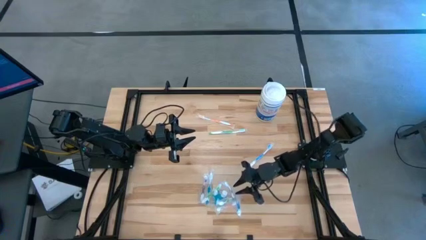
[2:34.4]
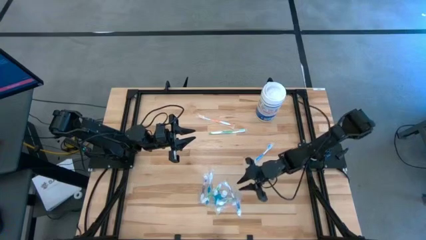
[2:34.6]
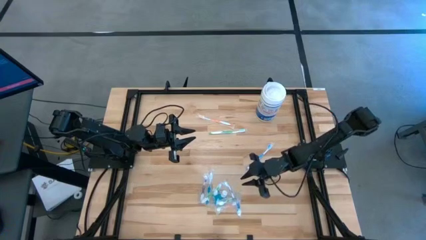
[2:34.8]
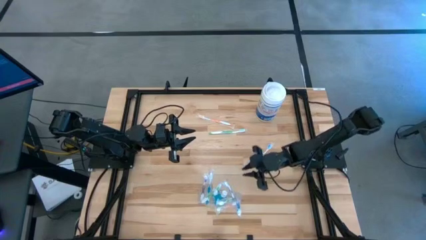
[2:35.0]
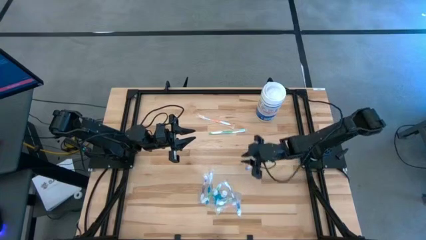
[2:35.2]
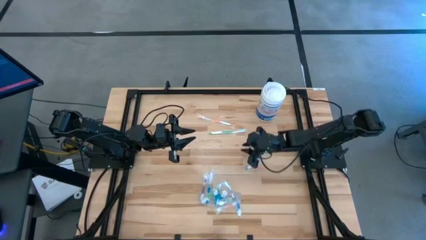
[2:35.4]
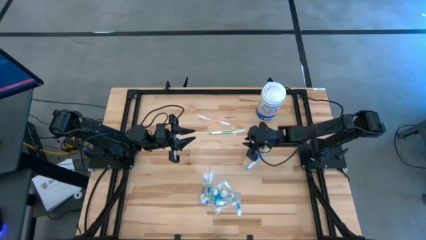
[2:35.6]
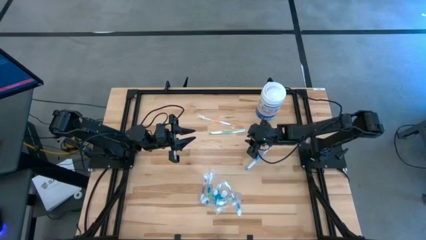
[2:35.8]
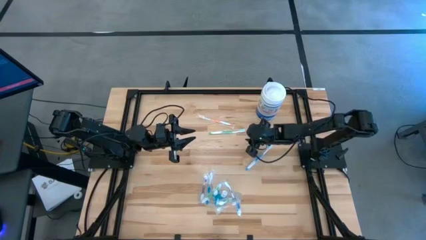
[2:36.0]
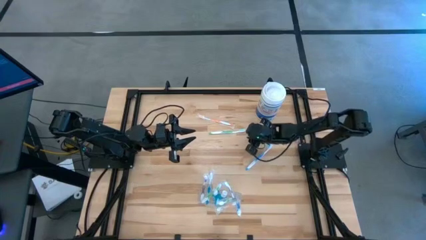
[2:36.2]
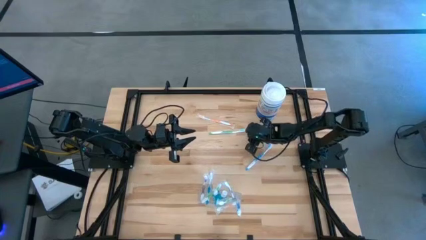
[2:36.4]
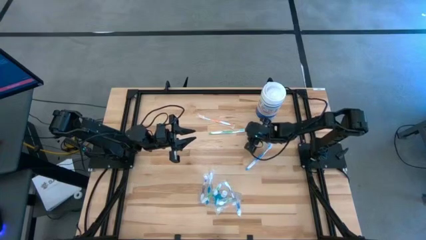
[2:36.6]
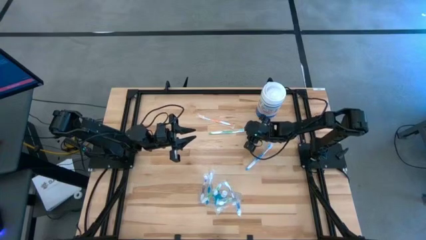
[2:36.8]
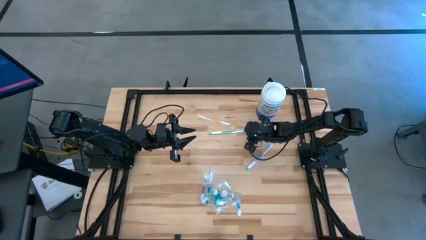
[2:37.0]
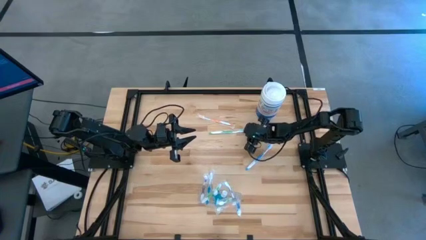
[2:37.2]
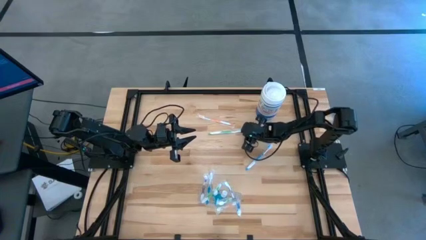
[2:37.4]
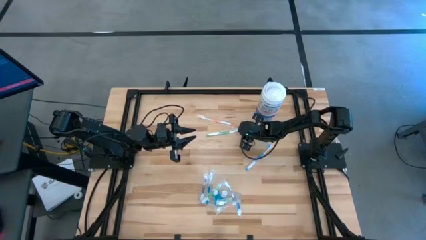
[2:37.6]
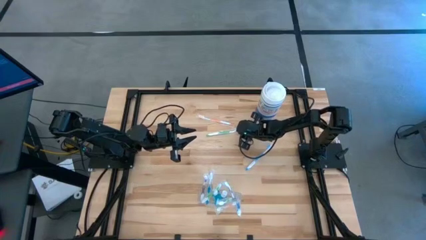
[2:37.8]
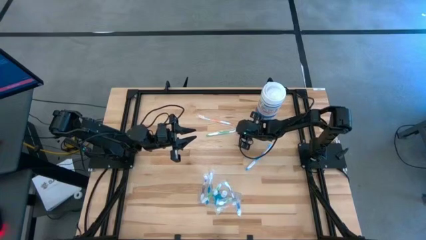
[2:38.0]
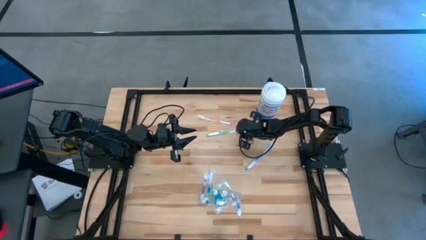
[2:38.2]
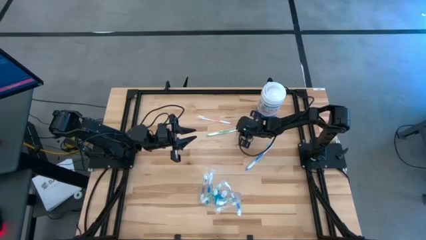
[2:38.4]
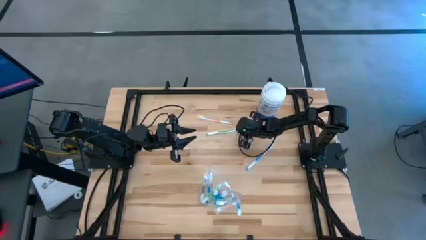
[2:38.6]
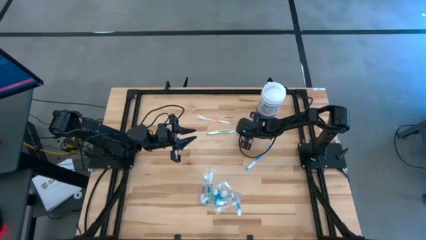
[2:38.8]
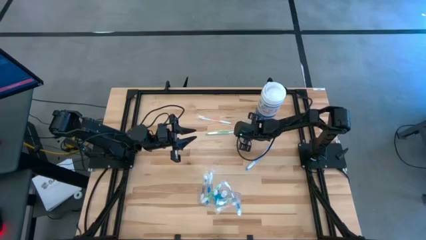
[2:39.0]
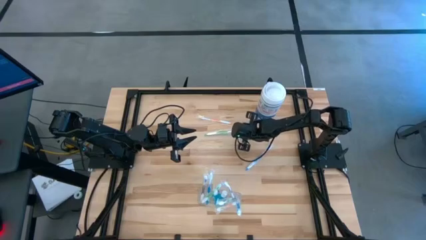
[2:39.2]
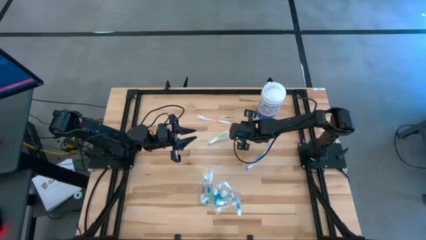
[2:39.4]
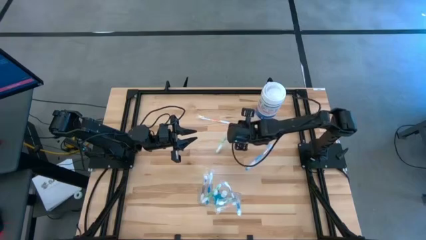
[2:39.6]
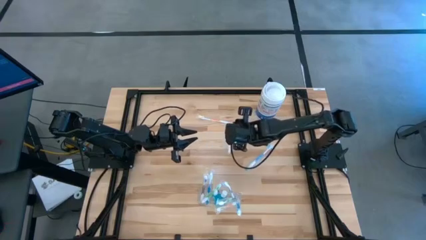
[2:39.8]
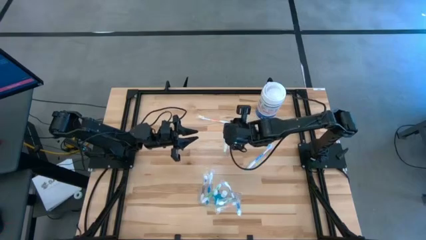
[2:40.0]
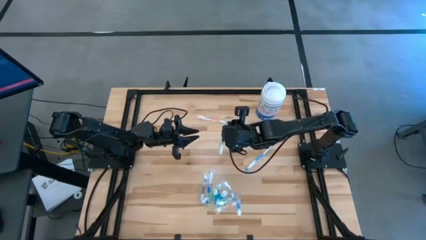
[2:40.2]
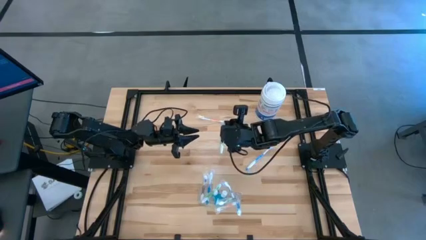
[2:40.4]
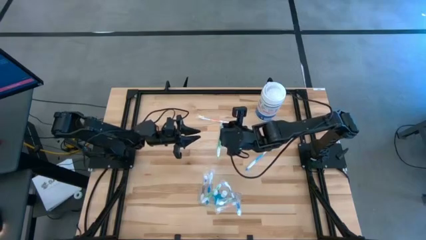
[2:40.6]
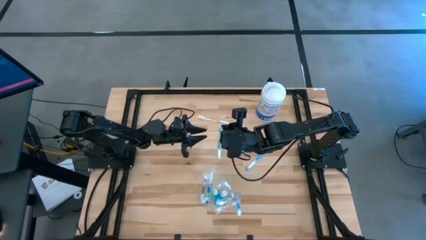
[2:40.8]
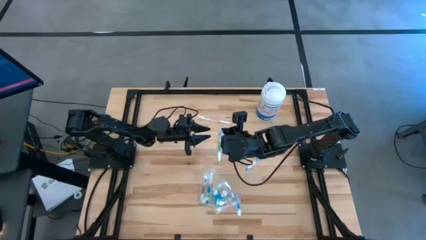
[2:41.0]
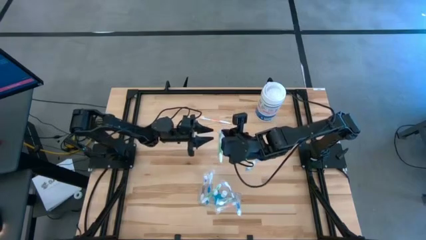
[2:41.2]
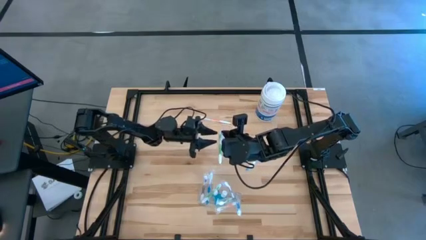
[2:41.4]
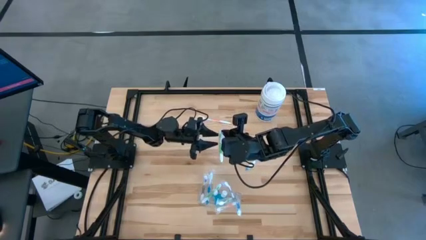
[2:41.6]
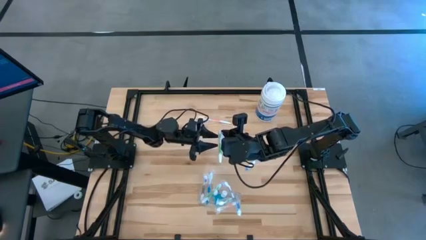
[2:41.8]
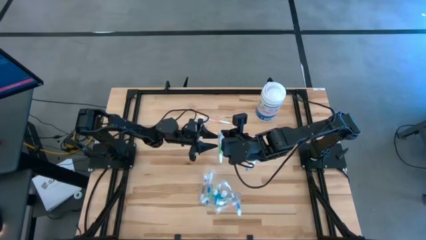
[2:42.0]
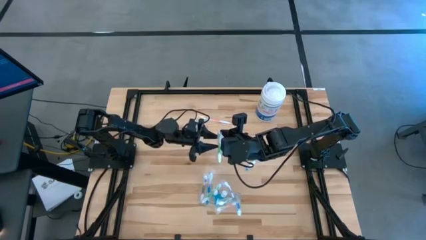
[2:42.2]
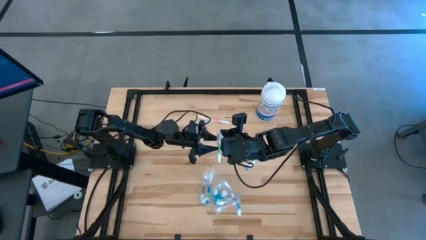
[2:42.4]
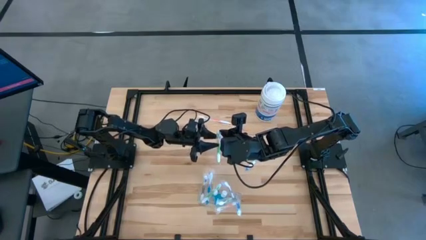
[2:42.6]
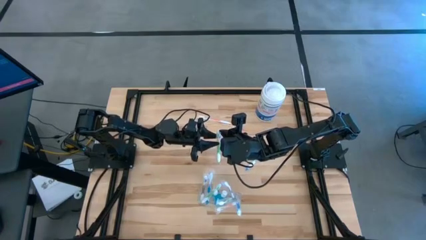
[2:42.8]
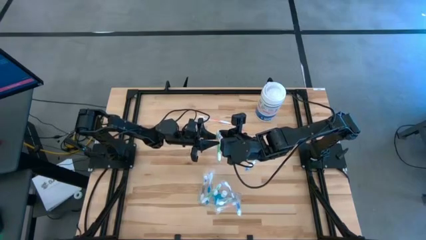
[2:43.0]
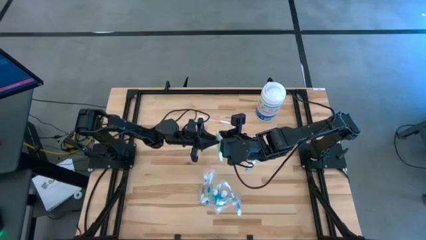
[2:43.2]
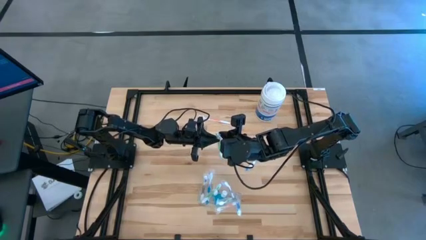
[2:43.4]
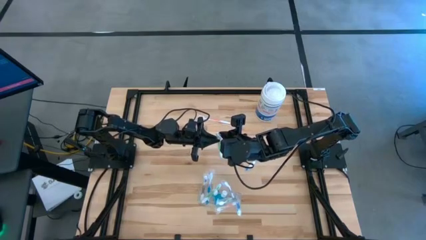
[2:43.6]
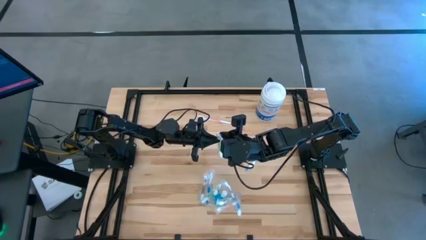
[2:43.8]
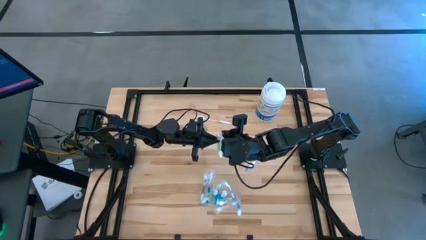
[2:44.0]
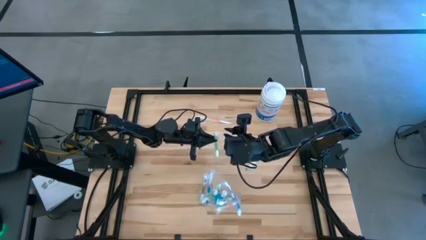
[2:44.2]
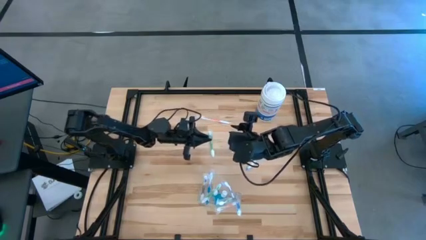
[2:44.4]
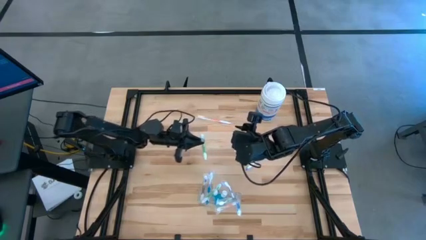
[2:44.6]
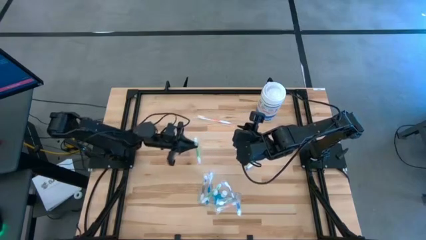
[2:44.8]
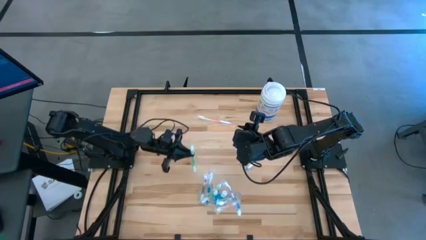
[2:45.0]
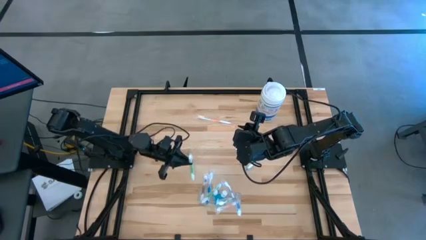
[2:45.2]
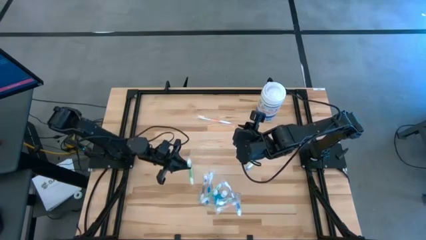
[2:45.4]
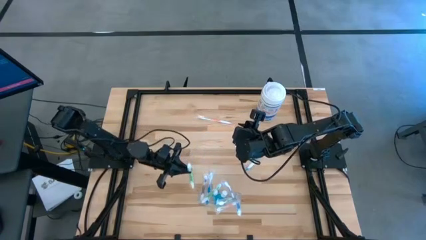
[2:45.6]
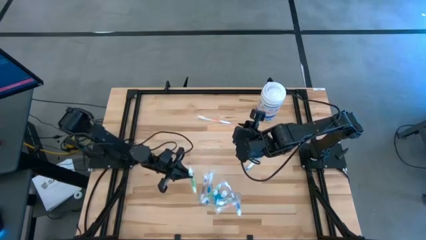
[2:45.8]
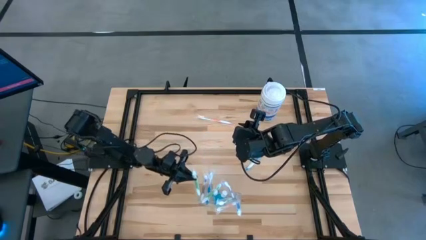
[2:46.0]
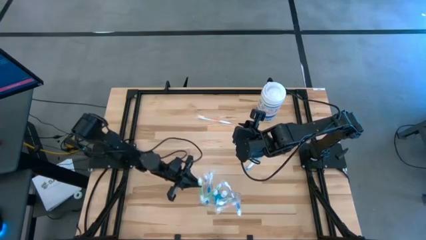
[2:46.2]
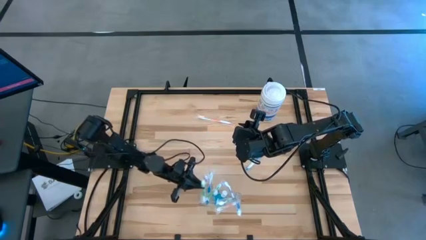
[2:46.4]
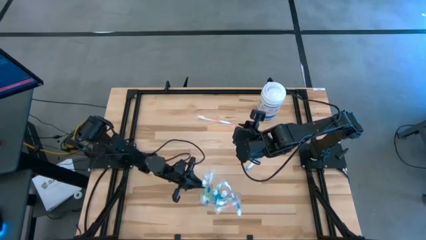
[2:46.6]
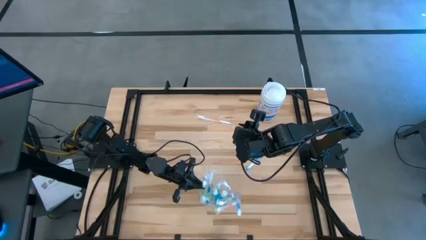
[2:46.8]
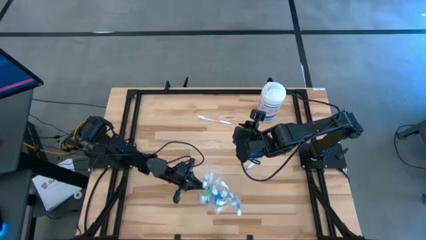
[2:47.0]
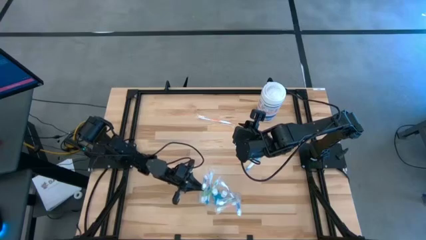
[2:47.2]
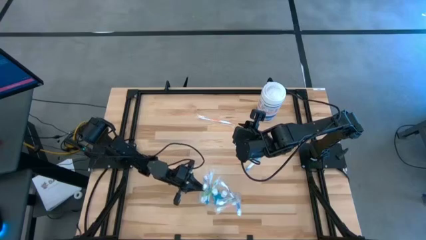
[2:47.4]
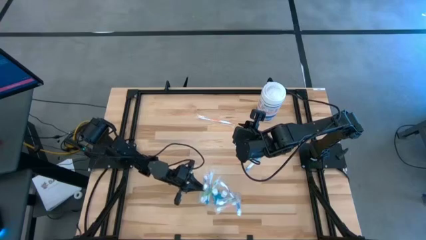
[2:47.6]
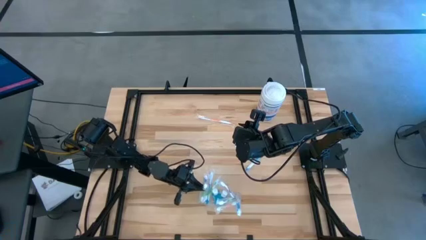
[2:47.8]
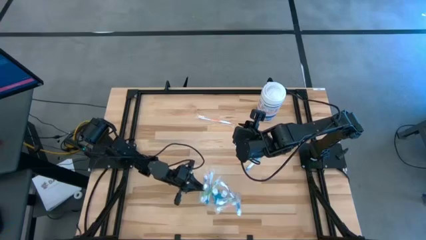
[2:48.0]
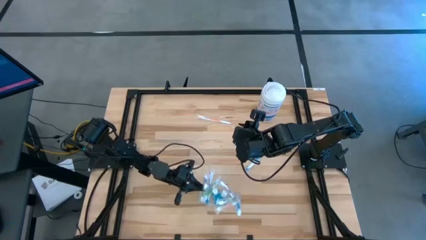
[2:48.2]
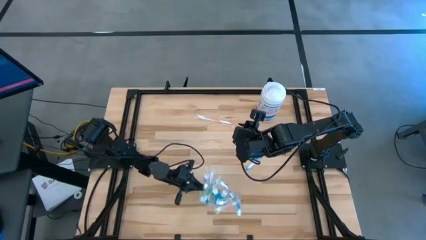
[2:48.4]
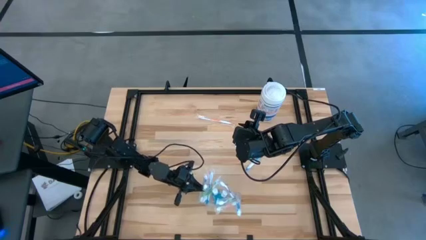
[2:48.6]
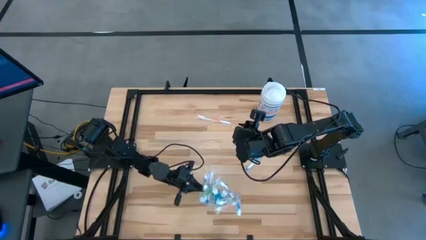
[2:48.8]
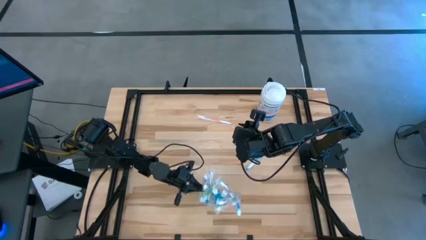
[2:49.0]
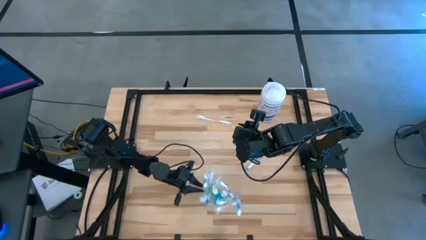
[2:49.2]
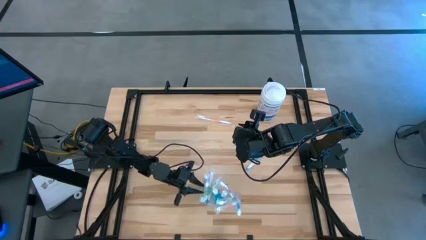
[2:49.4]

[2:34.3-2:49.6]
Task: Pick & Place toothbrushing station
Put the green toothbrush into the transparent organizer

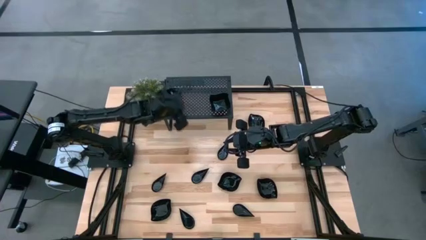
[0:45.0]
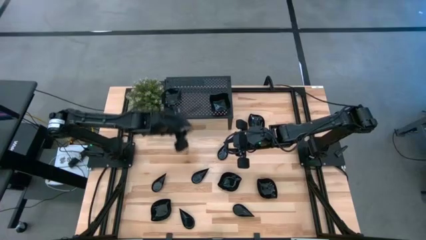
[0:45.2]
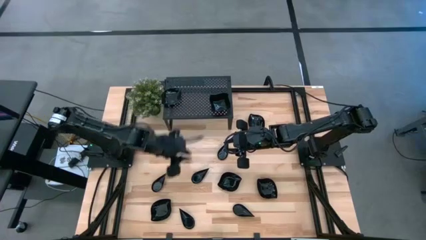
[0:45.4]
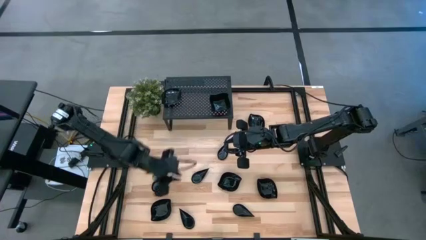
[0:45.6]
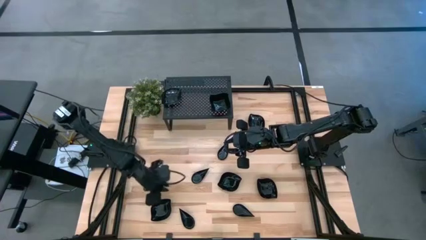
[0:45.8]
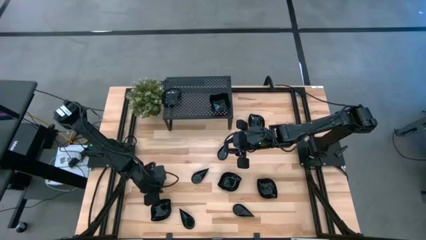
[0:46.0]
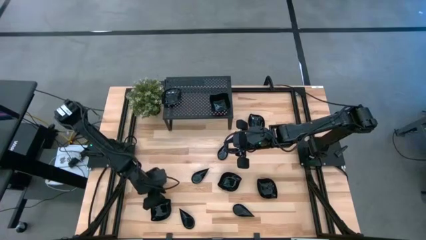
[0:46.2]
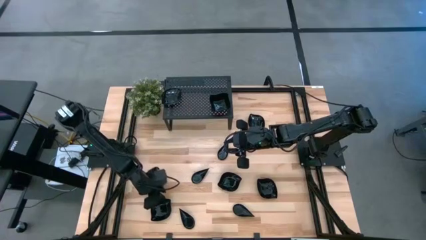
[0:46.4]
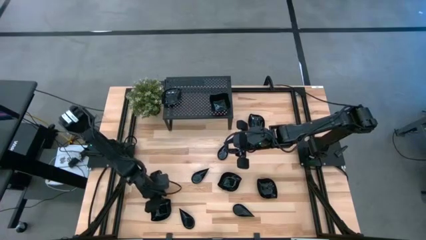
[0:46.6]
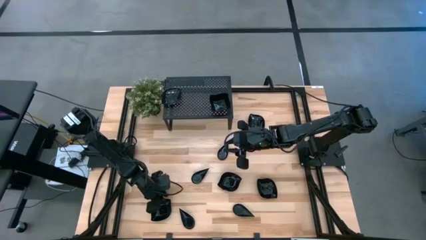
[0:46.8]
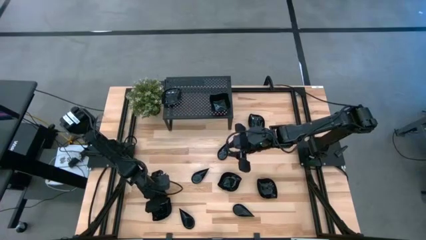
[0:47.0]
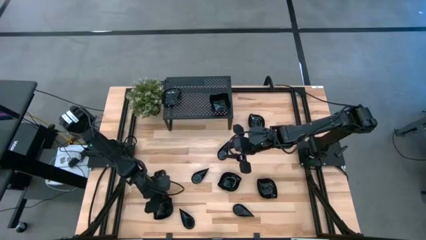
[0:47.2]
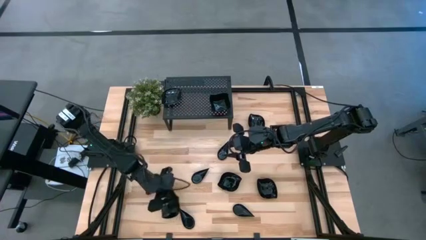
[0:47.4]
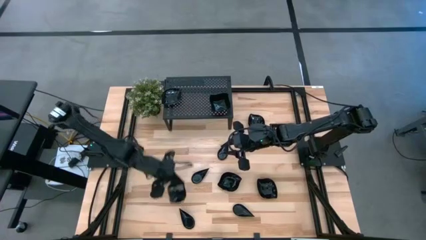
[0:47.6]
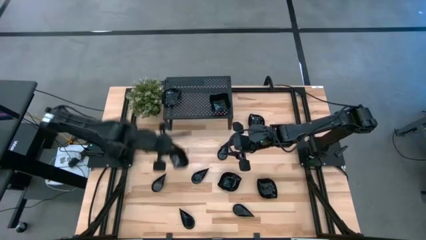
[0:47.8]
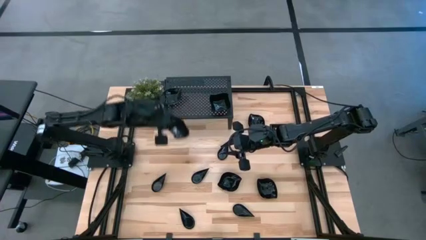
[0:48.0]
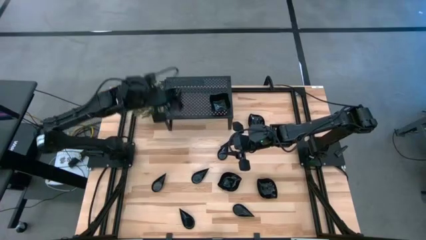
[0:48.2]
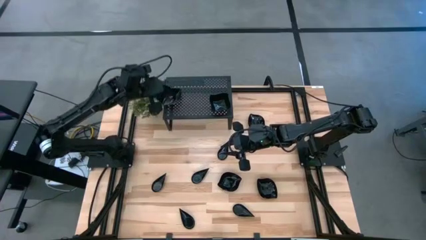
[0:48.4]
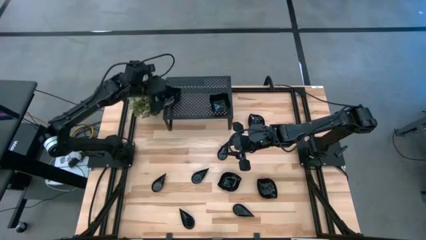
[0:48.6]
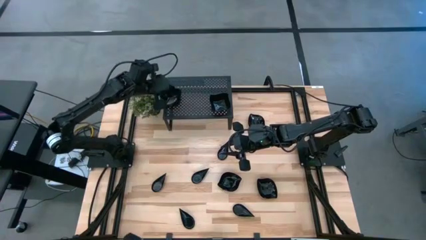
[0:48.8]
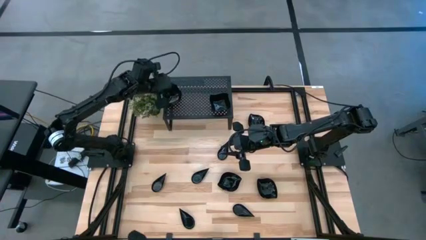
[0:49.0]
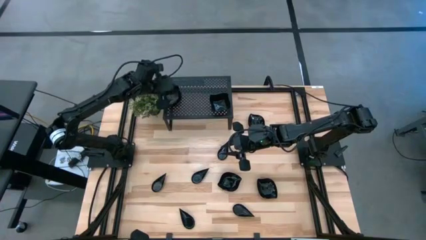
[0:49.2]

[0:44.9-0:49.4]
Task: Pick & Place Mini shaped plates
Stack the black leaf-shaped plate on top of the black leaf-shaped plate on the shelf
